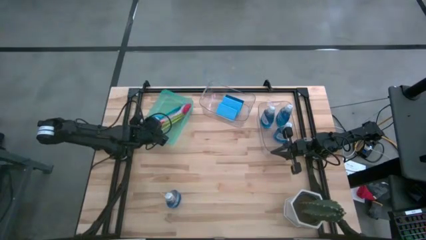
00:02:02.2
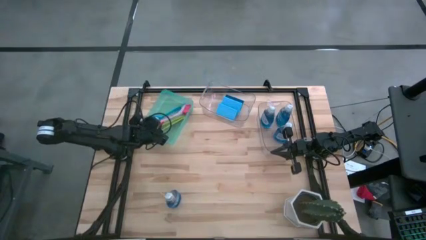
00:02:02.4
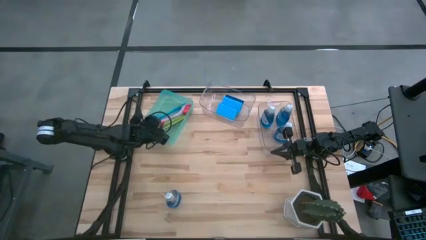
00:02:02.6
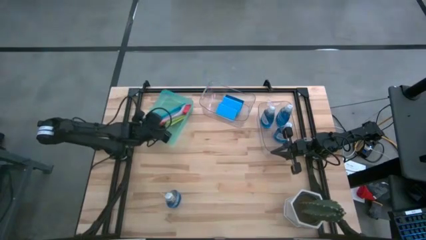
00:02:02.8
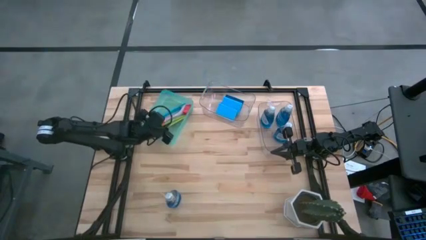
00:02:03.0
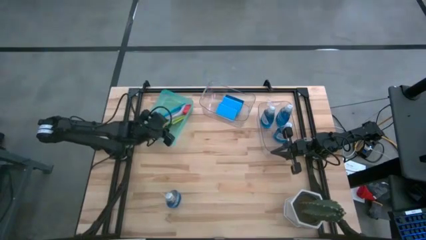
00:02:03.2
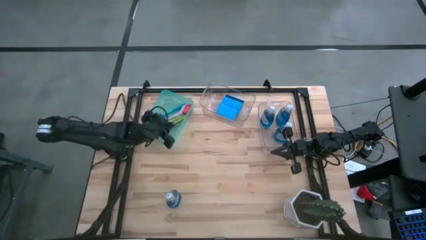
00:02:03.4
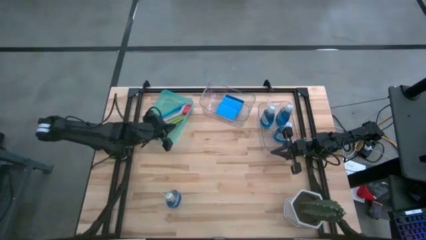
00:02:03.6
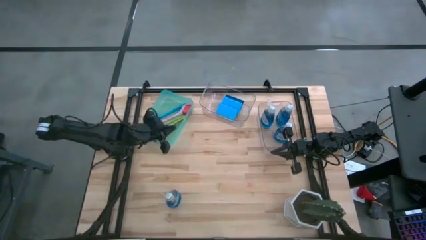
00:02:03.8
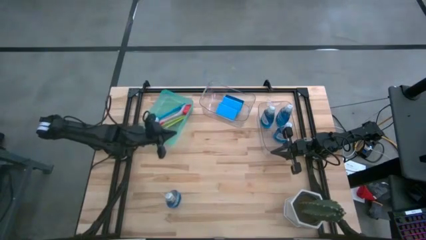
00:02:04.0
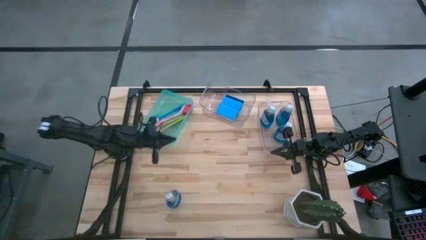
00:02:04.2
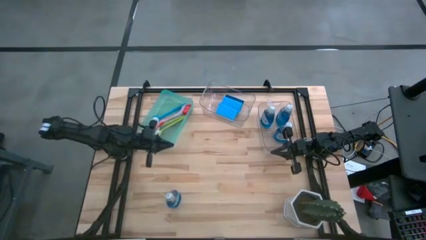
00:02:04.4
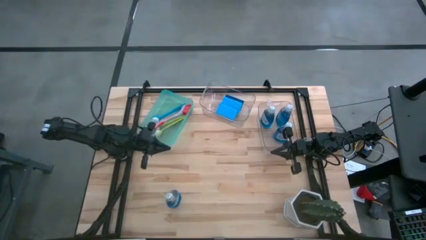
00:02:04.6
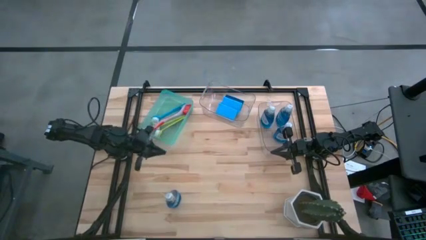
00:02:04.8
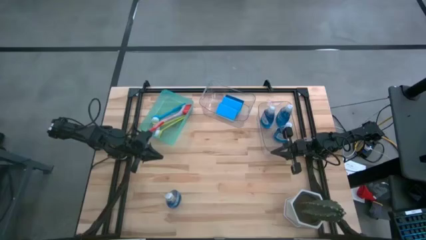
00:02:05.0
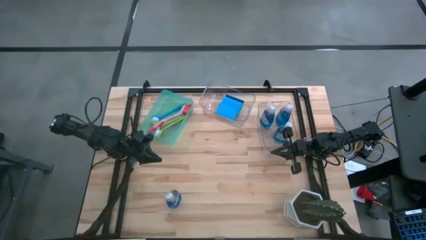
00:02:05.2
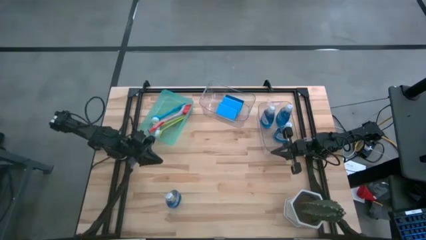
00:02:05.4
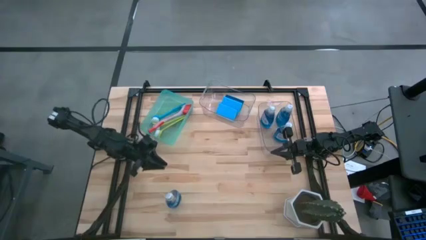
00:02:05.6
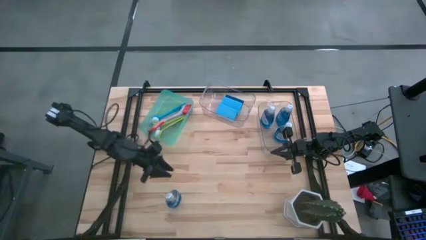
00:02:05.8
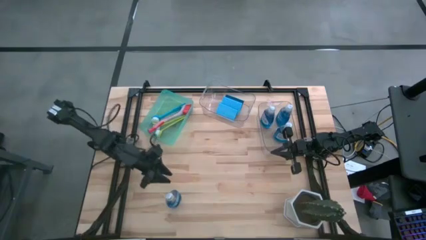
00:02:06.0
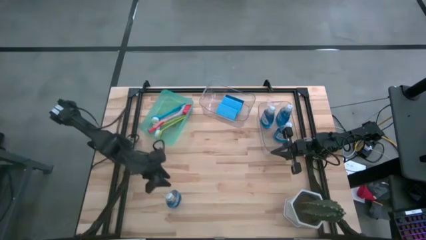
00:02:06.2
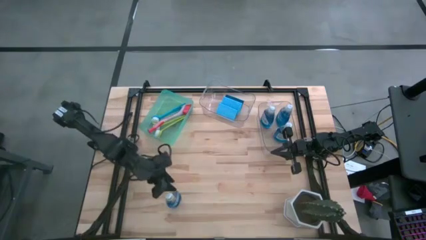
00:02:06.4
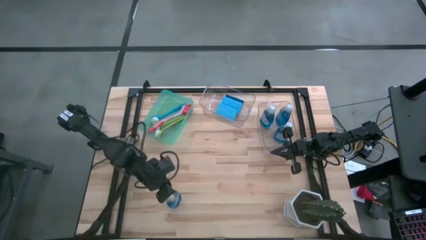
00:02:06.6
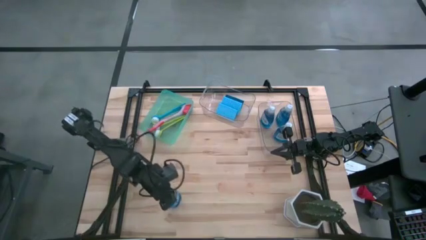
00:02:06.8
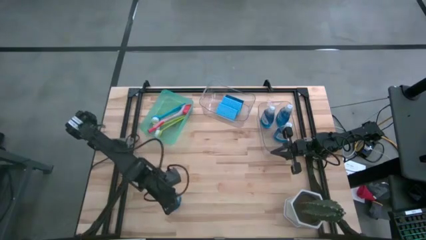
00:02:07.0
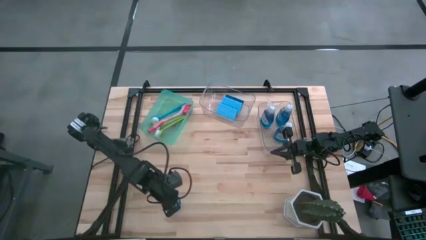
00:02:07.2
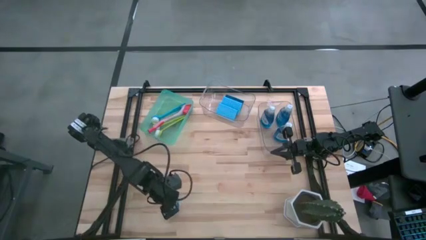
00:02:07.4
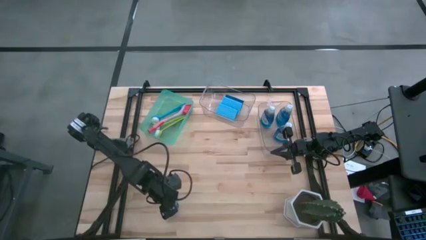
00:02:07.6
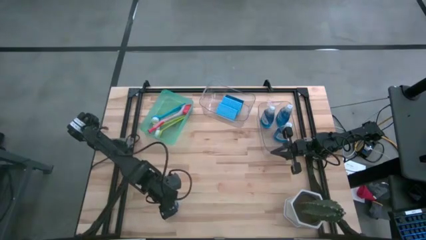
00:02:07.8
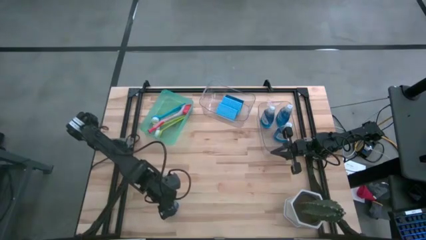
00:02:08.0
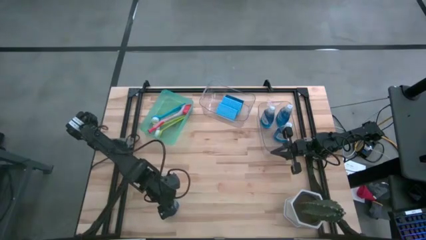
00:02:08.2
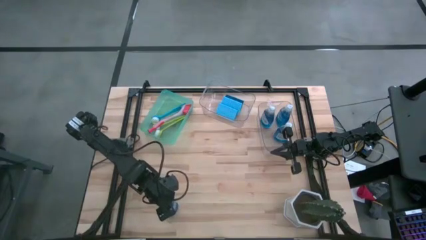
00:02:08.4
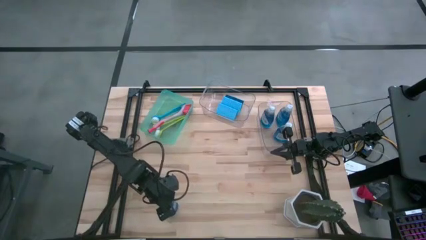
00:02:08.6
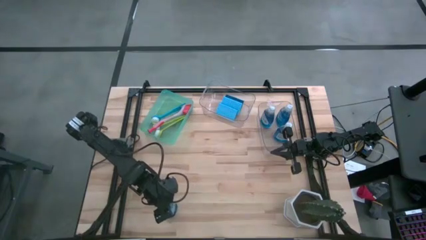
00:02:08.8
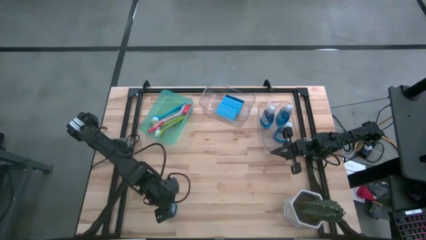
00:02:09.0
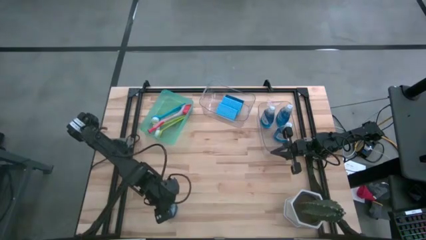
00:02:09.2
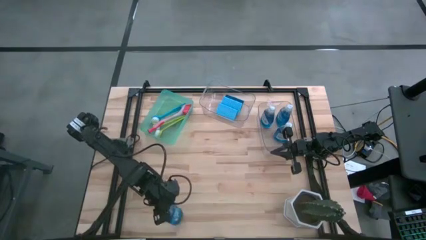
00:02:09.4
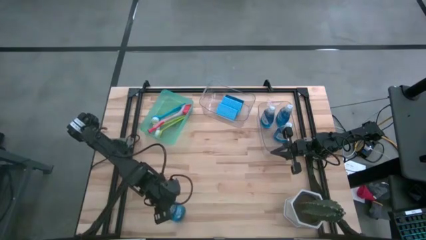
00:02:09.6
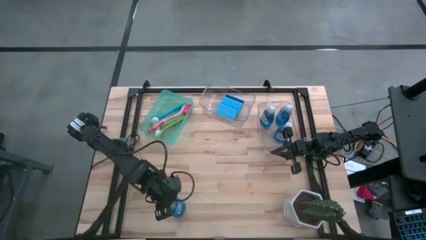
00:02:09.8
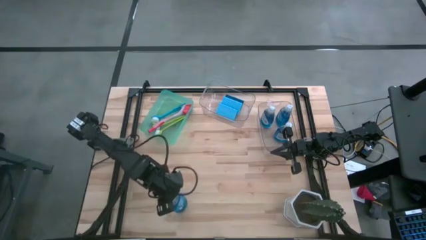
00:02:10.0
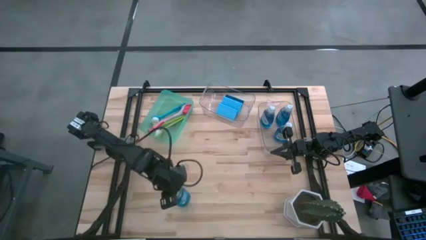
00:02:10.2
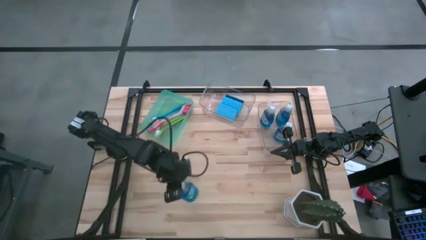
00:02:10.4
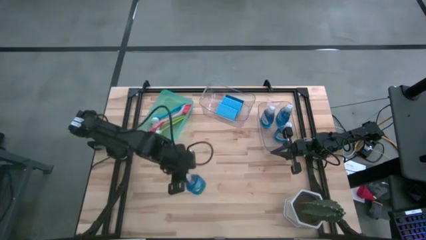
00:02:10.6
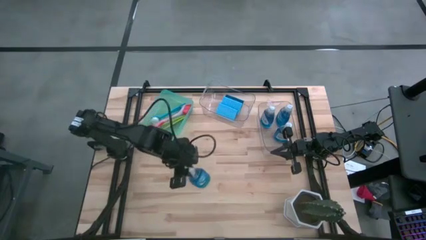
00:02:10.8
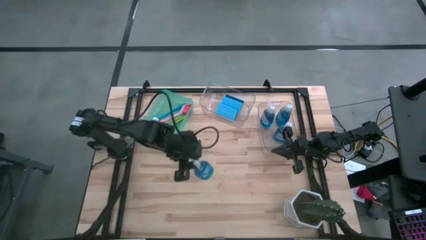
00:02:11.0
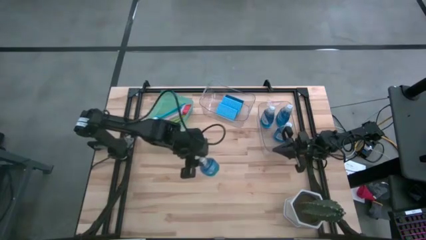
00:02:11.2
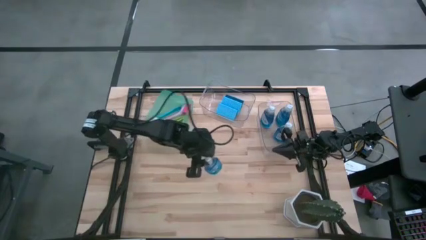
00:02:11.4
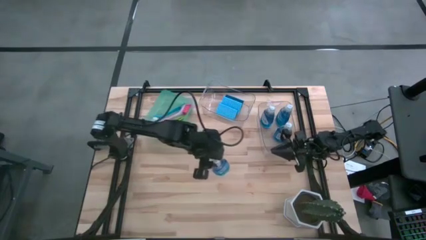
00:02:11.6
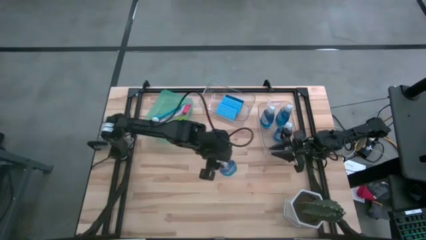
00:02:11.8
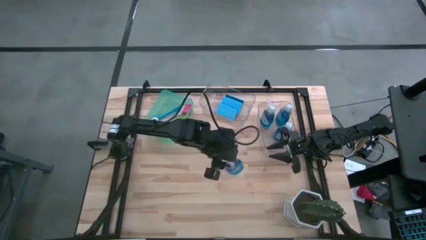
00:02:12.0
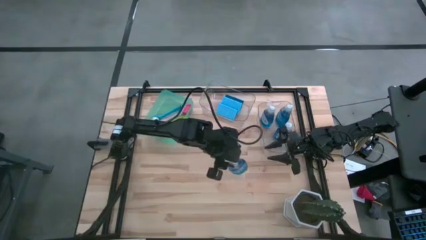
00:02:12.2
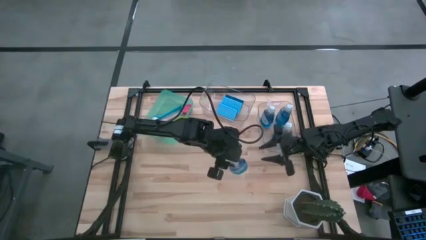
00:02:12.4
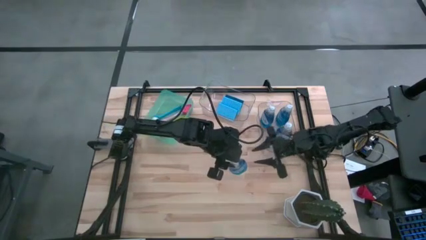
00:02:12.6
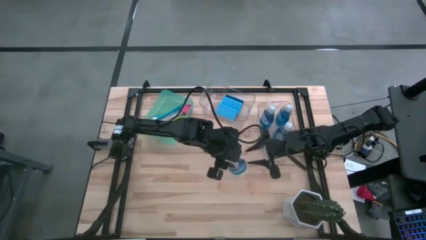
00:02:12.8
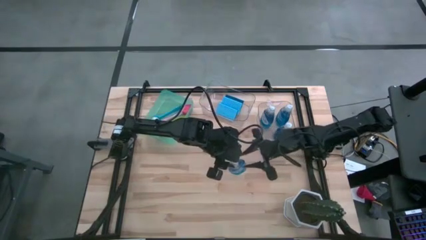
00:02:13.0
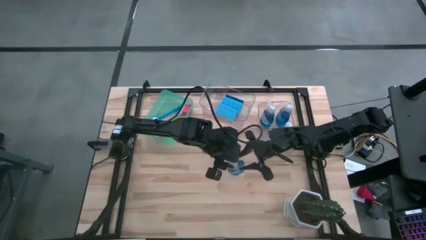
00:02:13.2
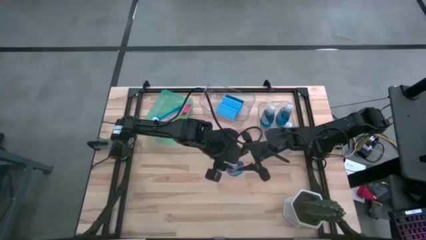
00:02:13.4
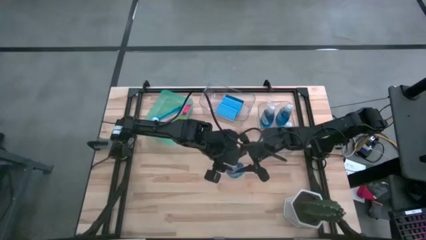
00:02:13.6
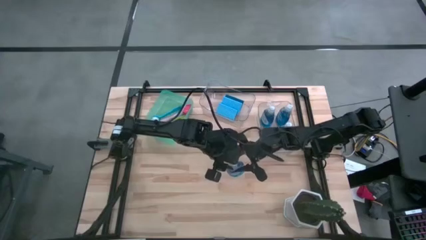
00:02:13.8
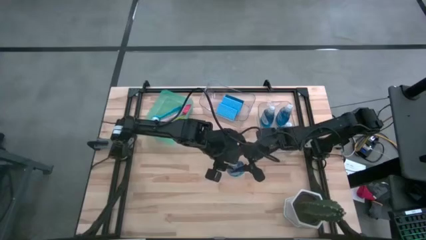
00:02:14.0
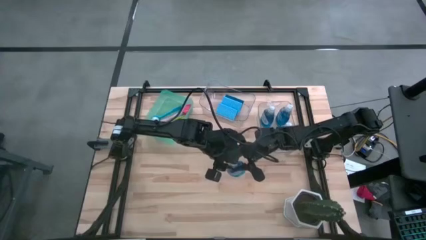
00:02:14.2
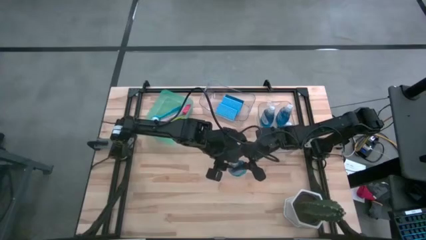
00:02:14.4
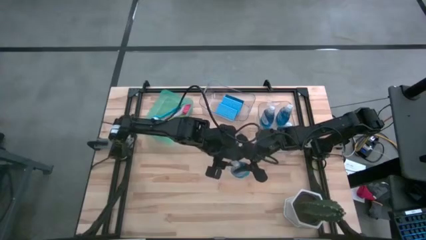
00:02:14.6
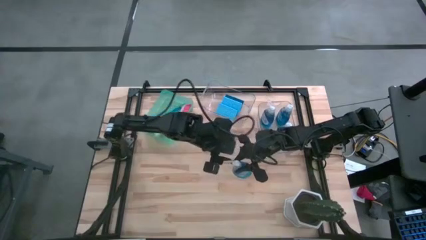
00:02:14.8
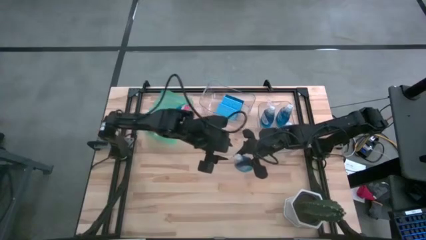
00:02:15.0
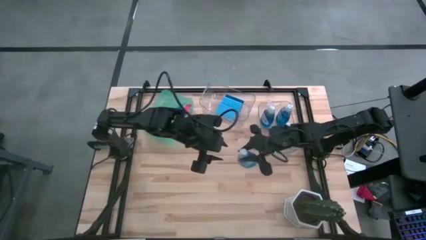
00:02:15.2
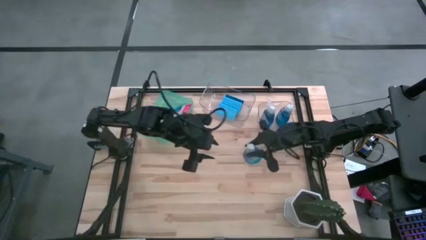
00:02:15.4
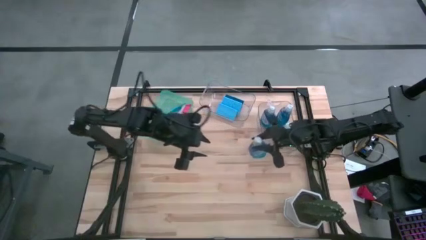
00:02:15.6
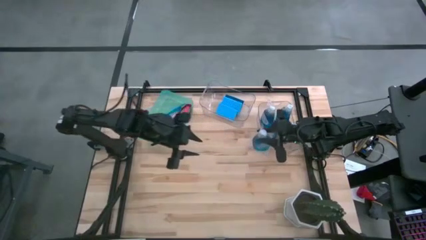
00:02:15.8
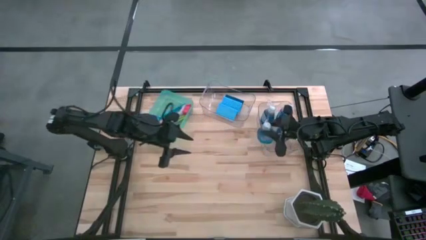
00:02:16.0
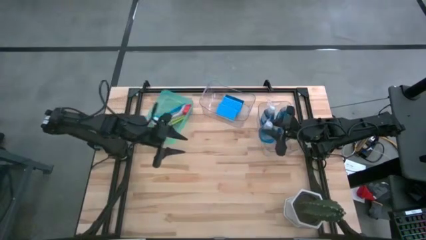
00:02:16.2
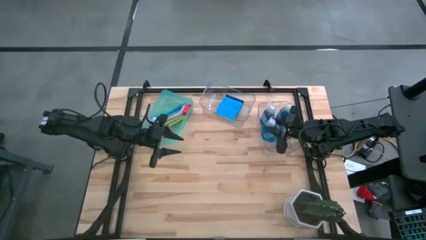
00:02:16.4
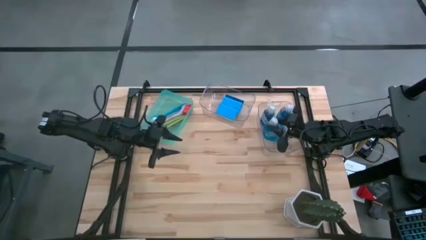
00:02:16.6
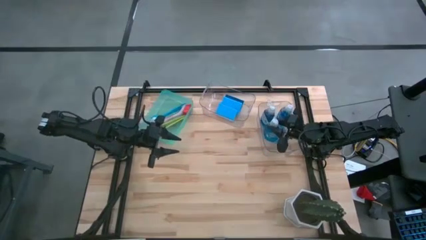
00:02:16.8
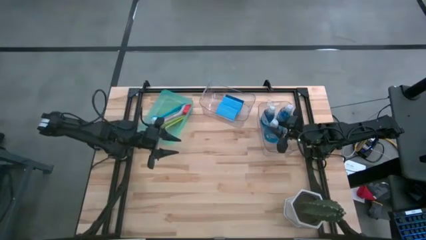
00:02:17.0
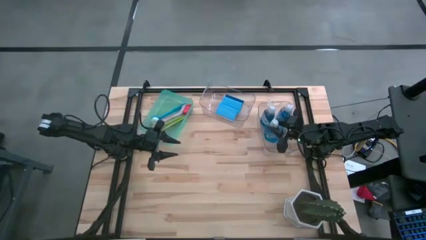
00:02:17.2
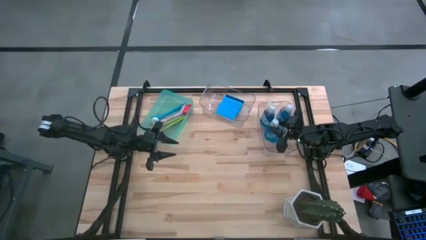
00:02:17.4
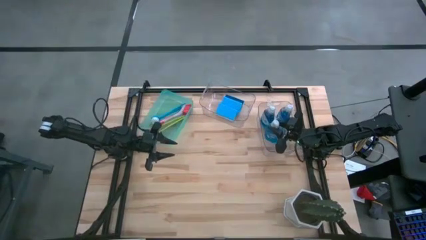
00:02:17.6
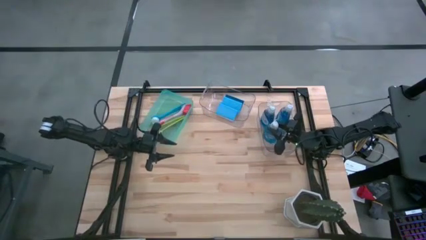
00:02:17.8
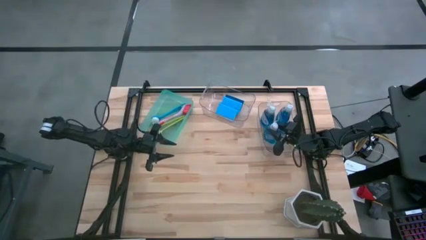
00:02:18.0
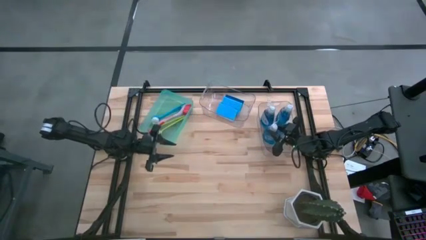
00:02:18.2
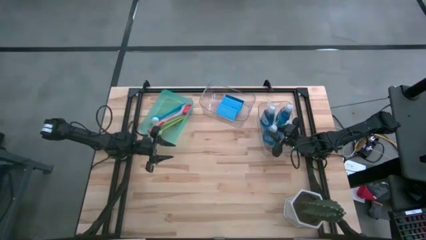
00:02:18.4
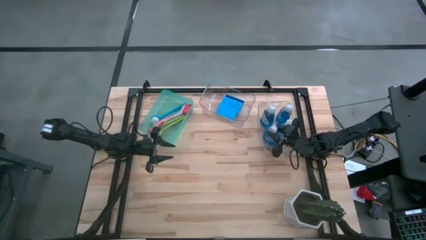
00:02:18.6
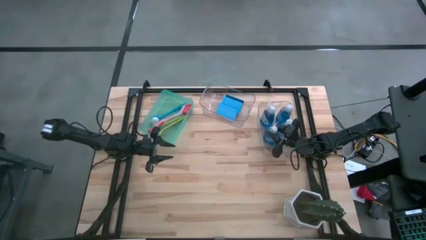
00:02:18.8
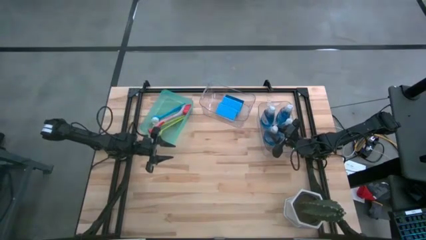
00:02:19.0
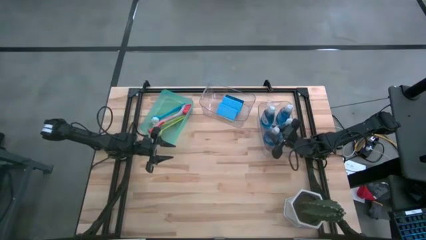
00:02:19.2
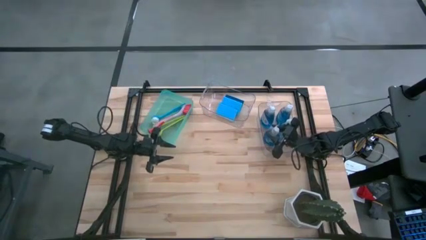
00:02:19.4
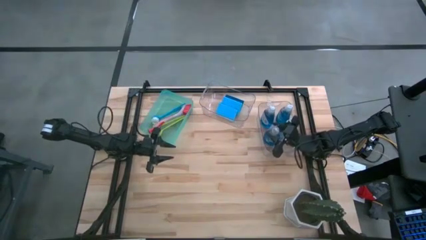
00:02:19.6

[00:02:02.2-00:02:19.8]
Task: Pick & Place Kitchen Sink Supplies
Put the blue dishwashing liquid bottle into the right transparent bin
